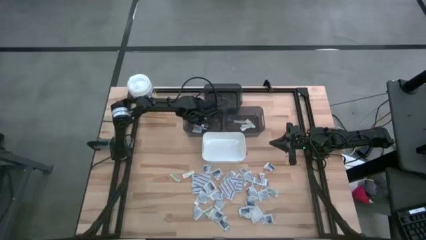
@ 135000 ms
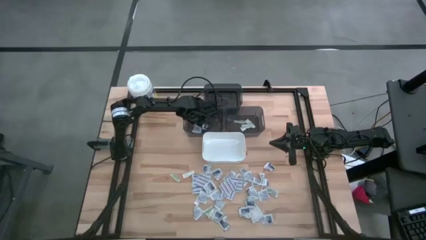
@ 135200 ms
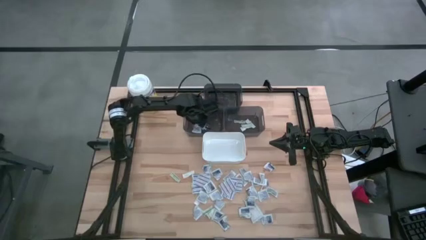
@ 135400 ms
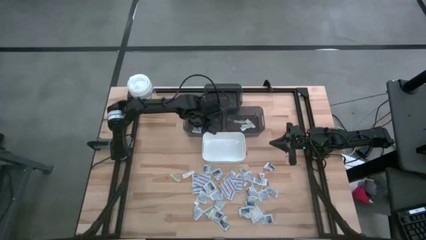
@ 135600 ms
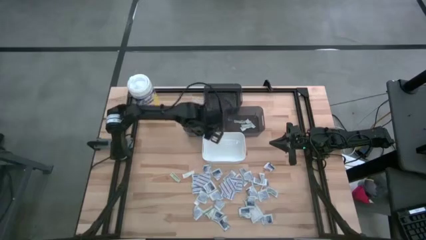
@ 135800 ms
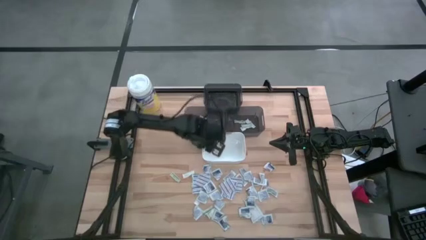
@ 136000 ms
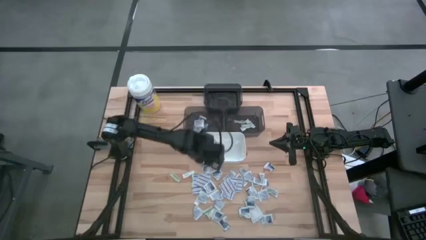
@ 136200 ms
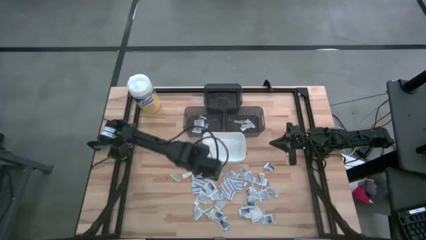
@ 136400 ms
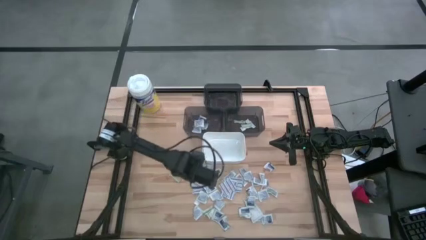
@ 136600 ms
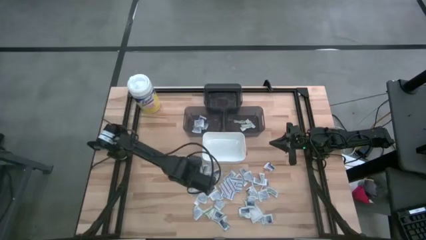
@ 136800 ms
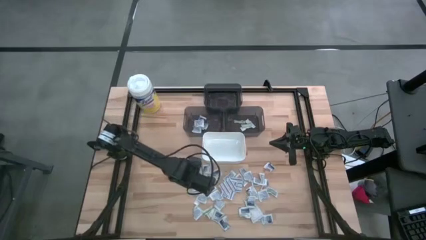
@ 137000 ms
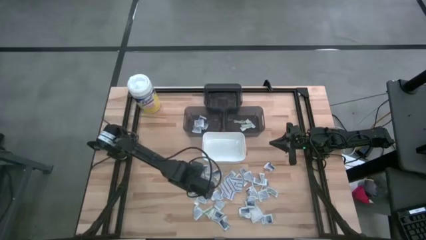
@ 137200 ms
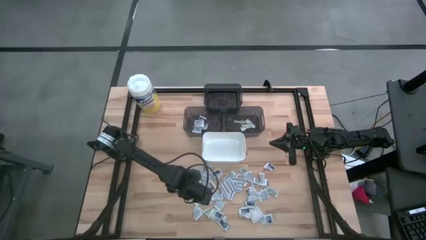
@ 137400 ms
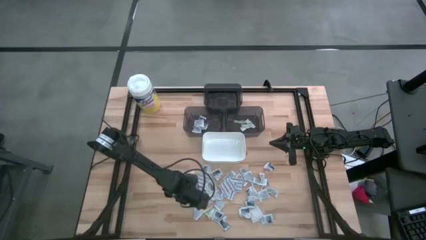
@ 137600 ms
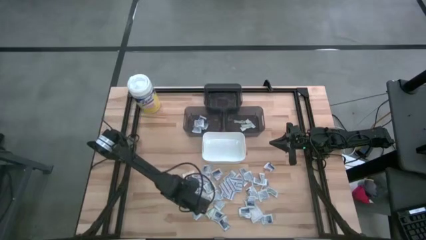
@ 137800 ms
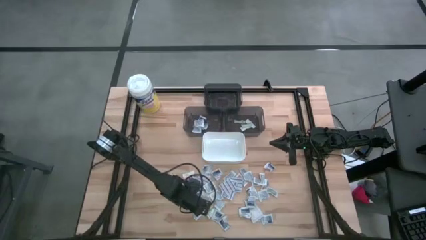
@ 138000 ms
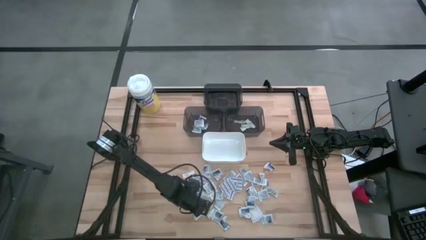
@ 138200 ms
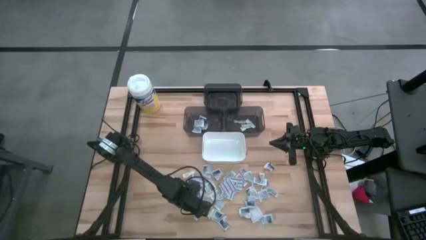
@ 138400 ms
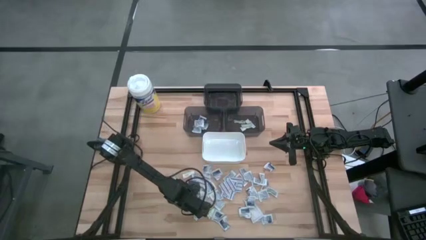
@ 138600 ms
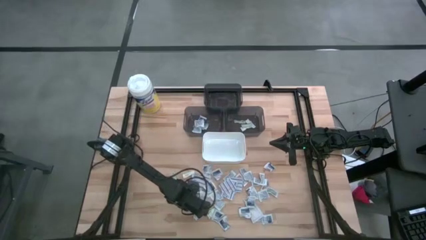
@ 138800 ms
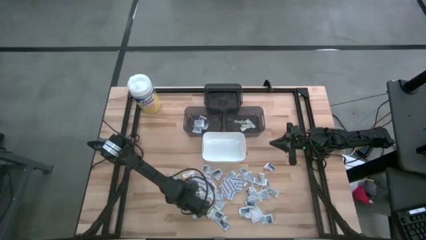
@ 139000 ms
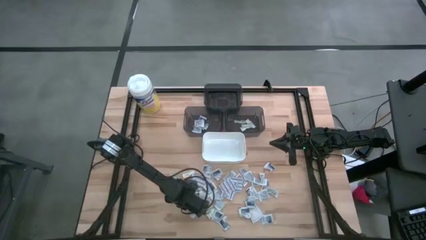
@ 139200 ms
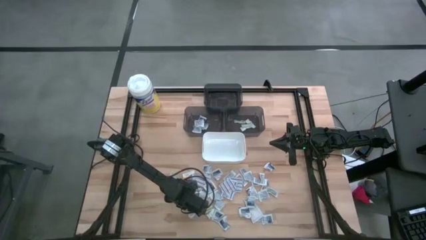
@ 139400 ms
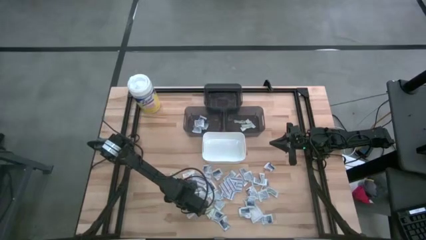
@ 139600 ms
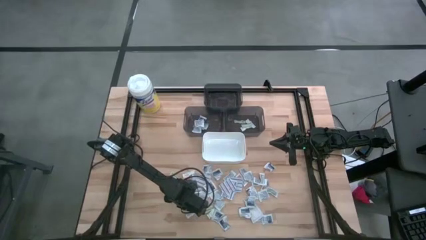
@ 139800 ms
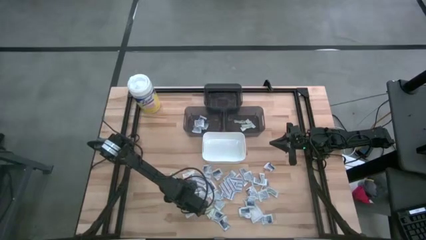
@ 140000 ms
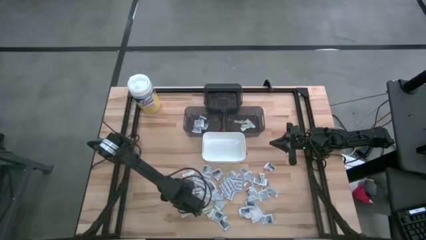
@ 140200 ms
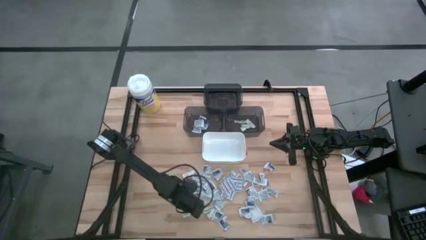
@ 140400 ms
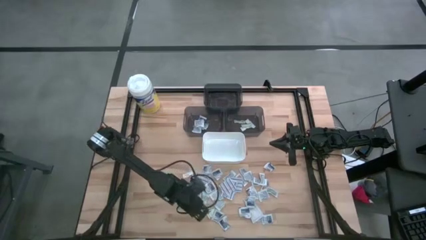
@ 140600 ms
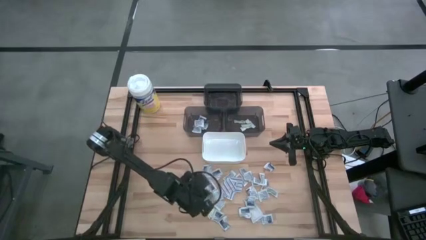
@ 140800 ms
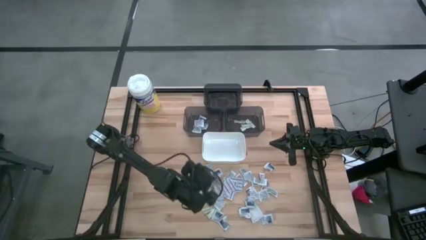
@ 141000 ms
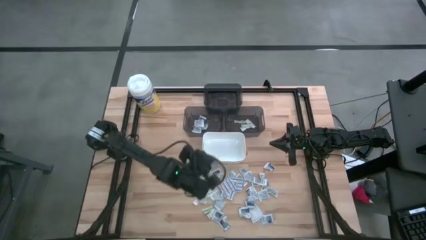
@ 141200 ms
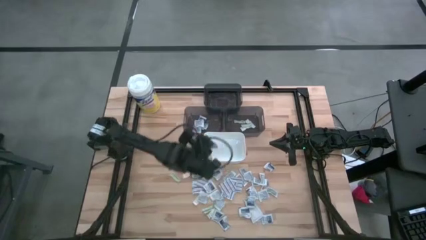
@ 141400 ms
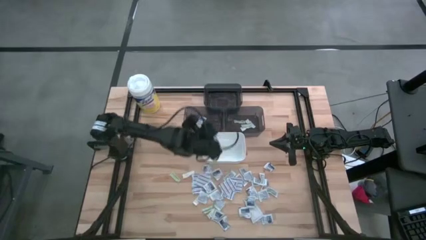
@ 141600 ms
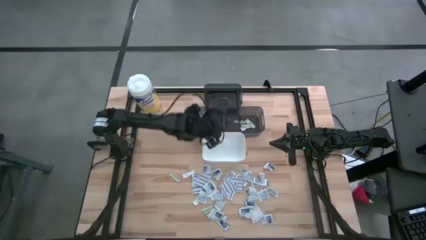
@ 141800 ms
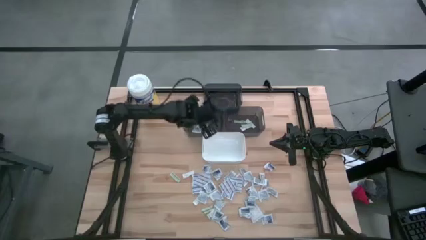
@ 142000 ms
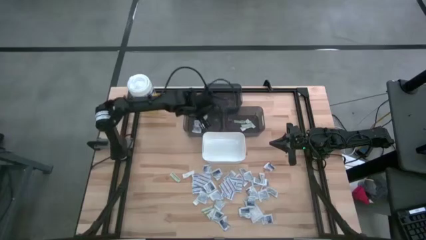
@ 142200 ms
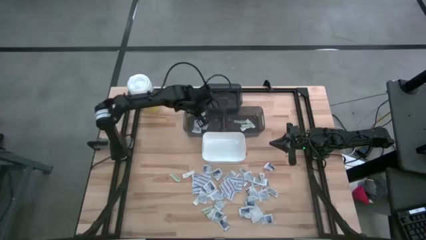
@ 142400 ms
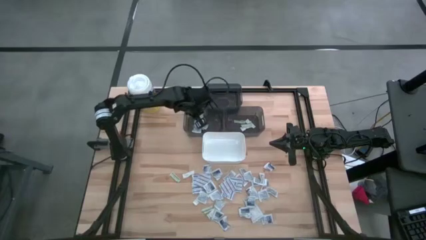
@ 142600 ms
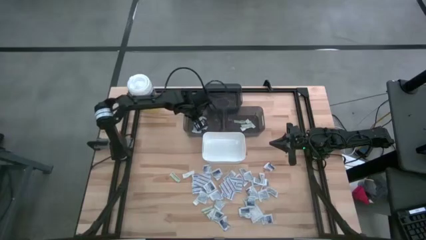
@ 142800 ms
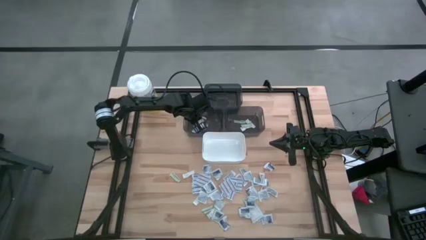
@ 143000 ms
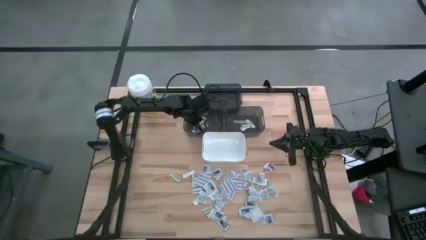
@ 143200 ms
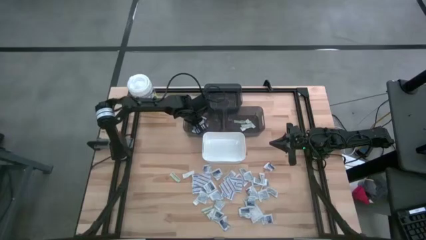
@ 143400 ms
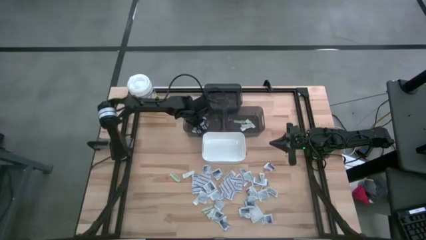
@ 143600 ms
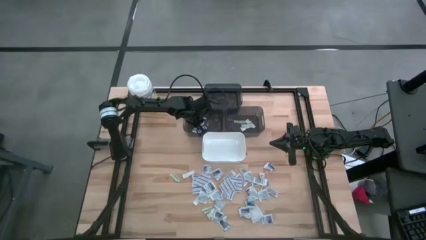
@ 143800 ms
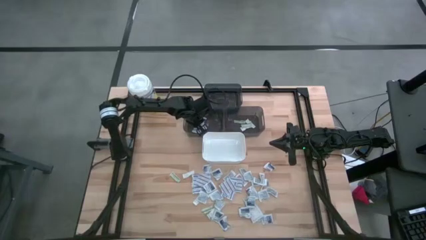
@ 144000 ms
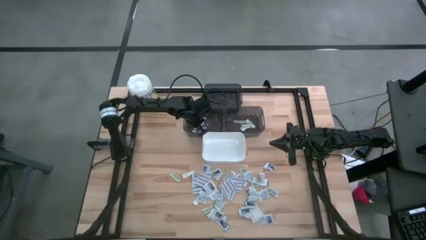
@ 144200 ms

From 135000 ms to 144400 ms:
Task: Pick & Place First Aid Supplies
Put the alcohol pad into the bottom left black bin

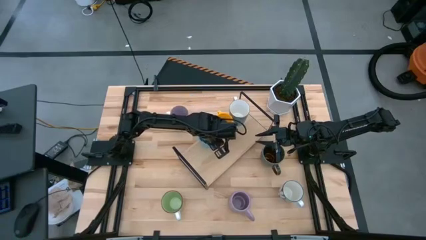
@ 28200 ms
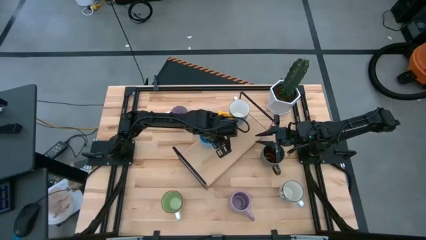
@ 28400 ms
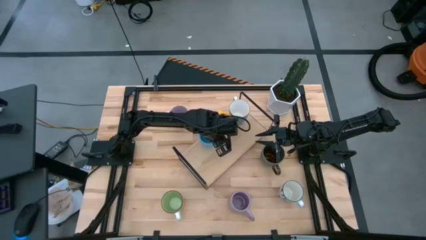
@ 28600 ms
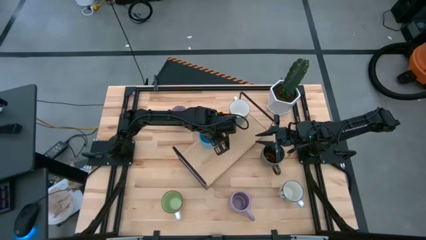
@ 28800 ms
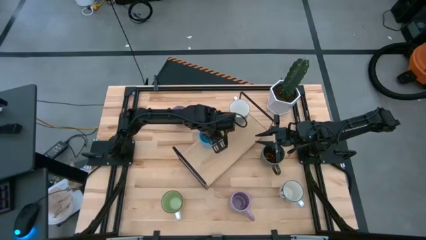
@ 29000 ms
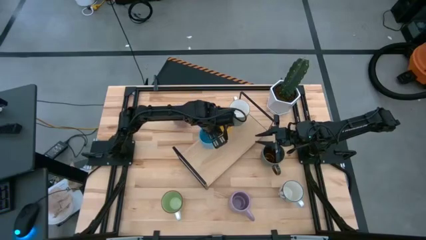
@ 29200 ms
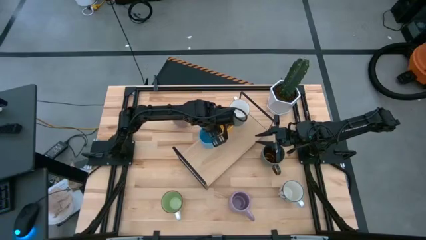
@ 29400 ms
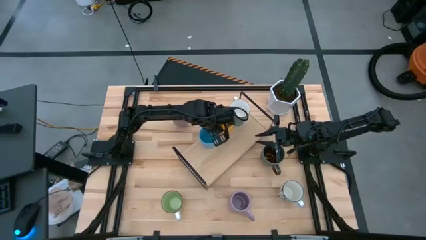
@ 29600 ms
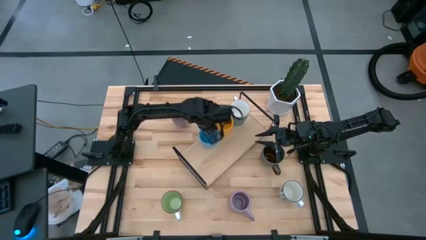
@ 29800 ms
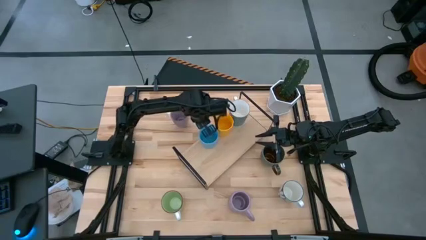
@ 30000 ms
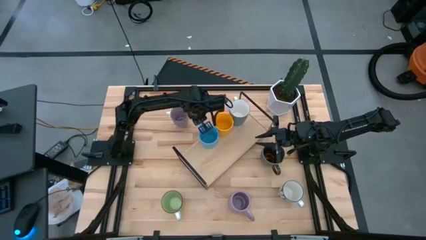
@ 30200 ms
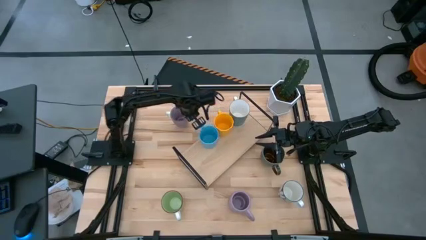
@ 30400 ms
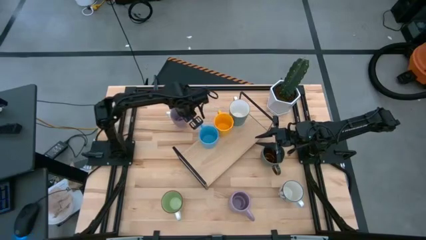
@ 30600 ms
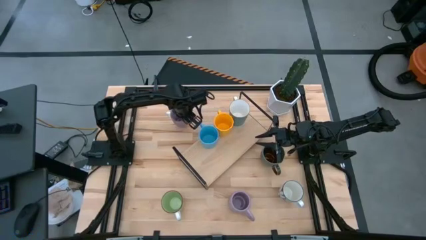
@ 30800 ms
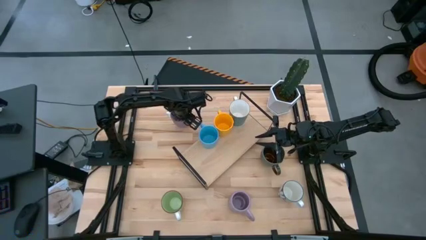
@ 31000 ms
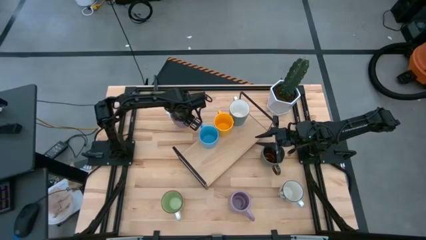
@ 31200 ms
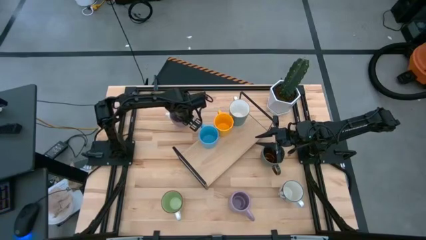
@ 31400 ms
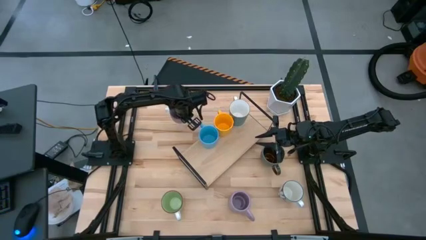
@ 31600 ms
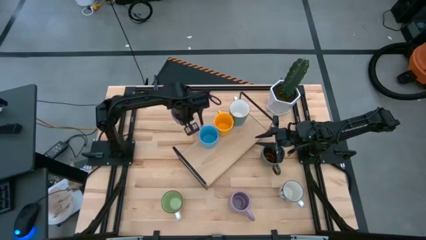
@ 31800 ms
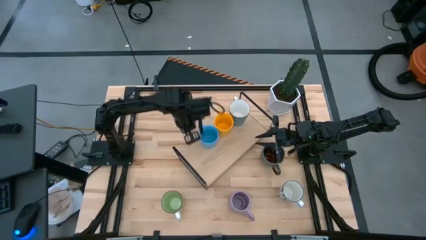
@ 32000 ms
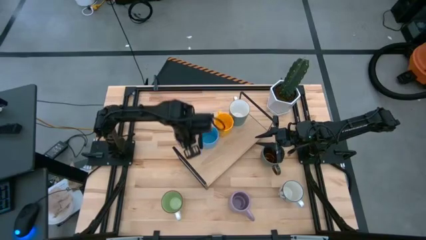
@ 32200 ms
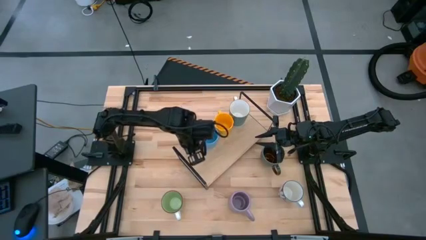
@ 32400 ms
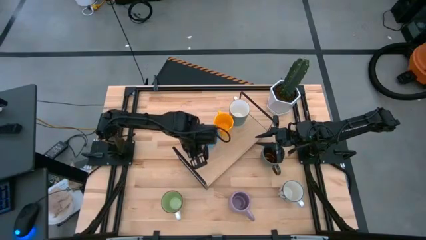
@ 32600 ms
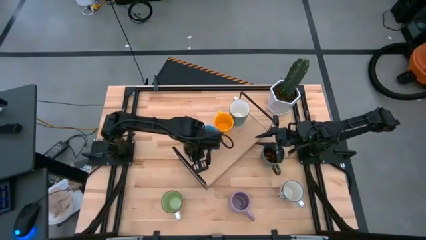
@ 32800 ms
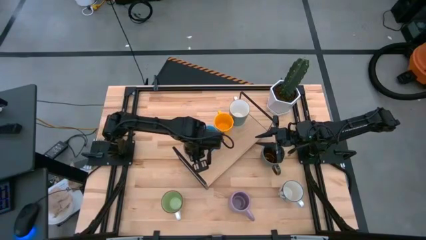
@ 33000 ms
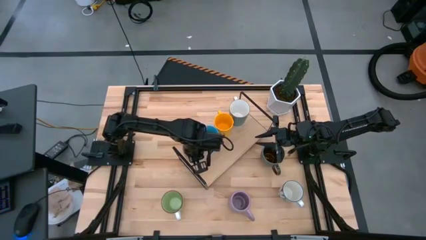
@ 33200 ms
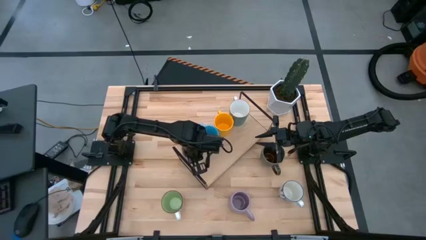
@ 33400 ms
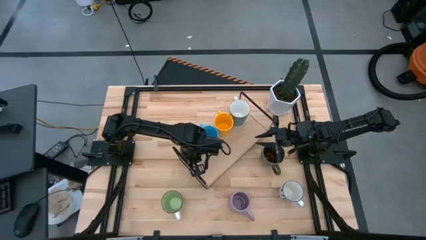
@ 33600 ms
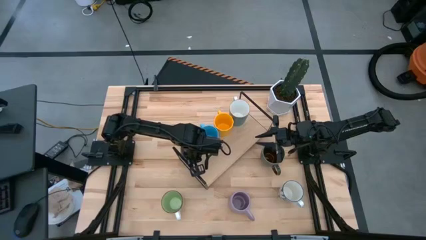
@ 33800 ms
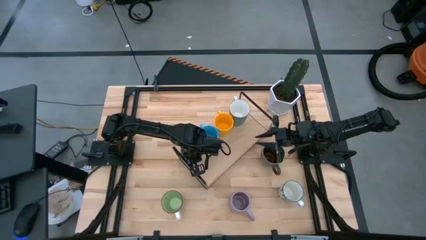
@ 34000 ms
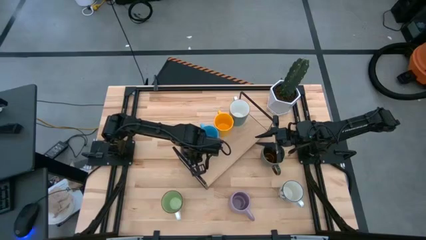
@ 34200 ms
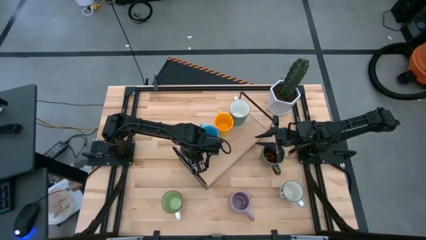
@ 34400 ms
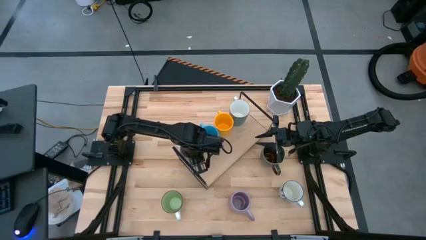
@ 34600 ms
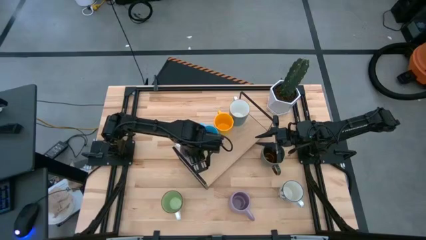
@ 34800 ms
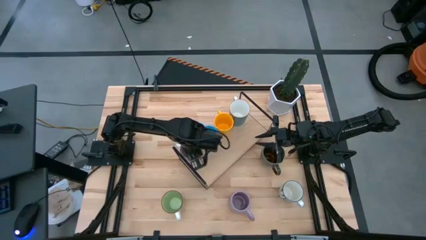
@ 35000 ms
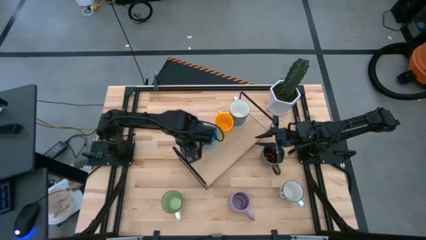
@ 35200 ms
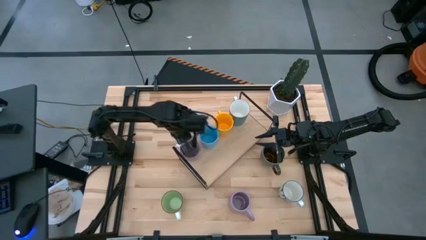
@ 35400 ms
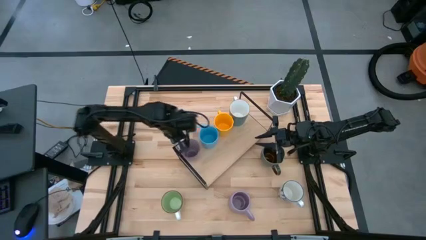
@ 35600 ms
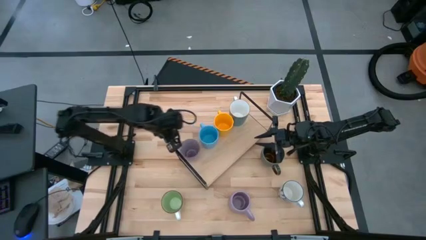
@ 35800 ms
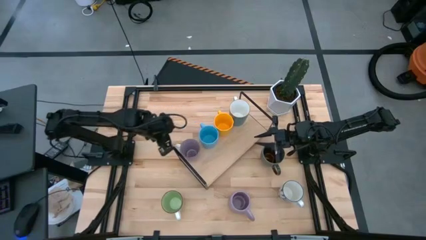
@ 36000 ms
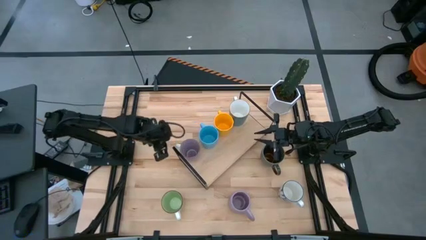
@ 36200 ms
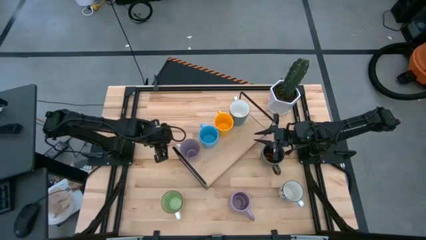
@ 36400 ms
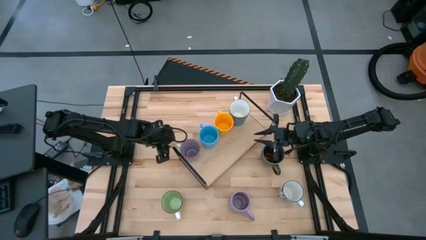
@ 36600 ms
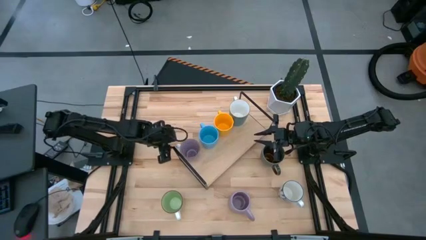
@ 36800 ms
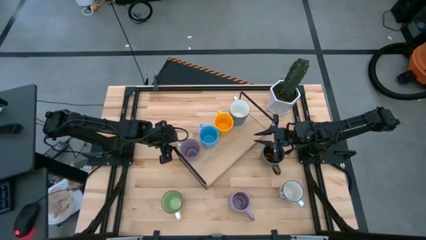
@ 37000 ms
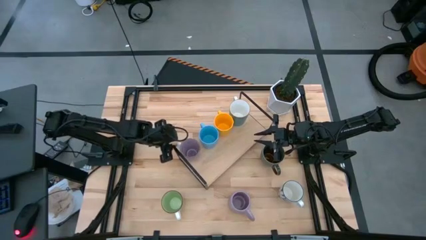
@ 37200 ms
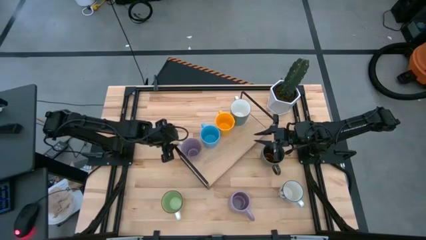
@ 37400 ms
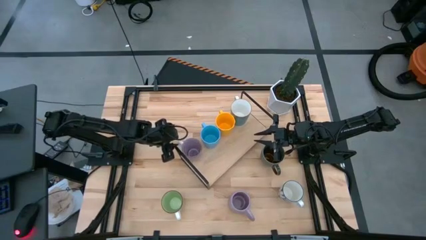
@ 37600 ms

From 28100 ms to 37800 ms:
Task: Place coffee mugs
Put the top violet mug on the shelf beside
